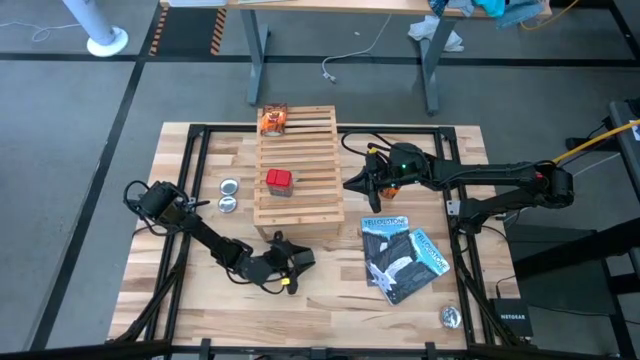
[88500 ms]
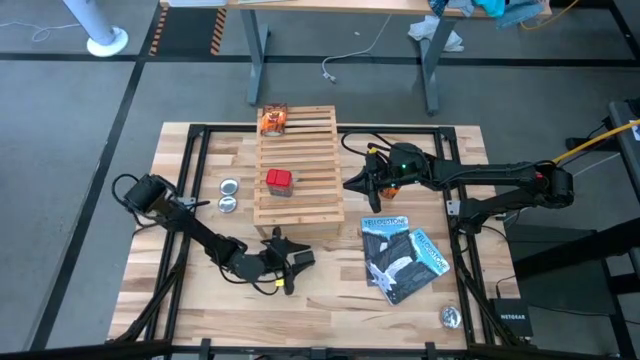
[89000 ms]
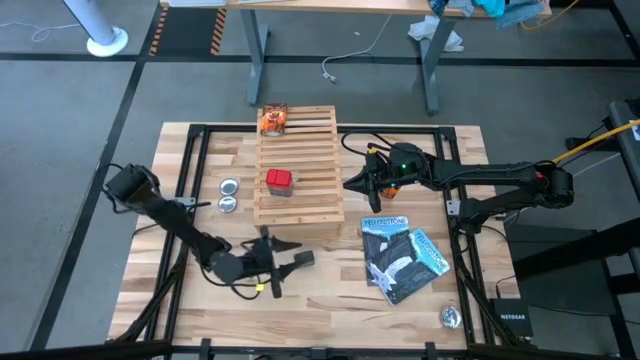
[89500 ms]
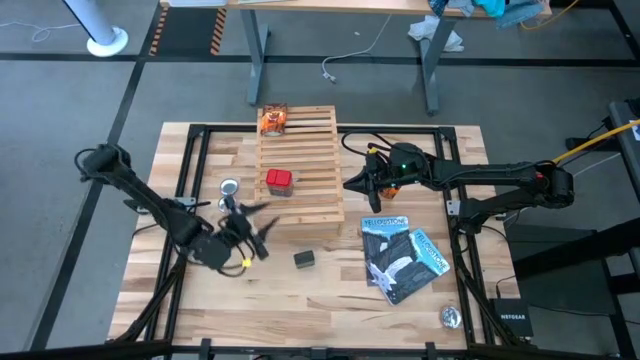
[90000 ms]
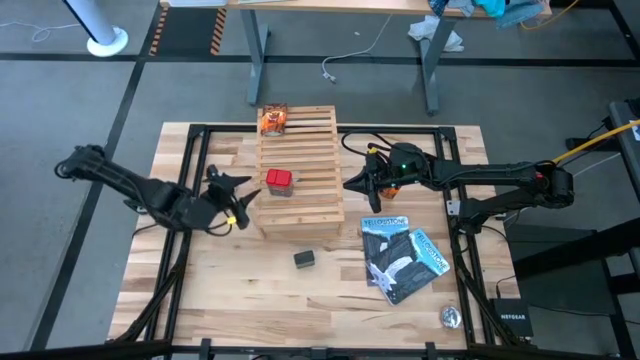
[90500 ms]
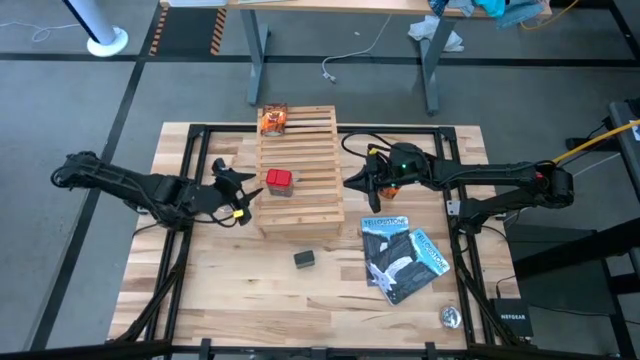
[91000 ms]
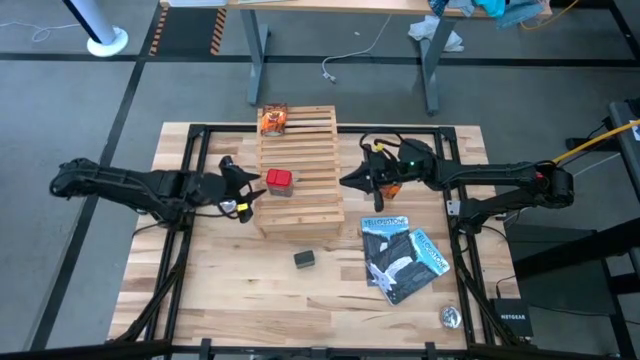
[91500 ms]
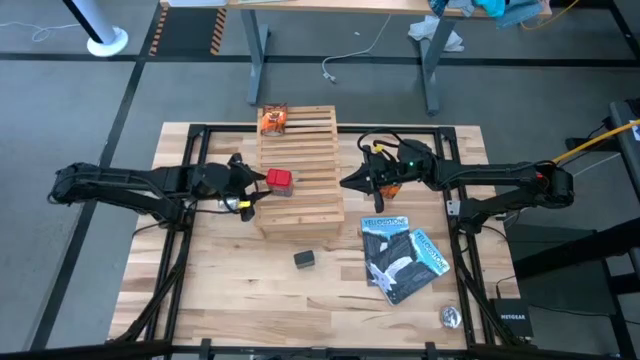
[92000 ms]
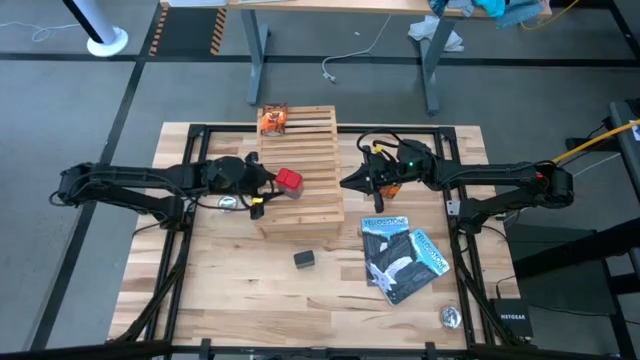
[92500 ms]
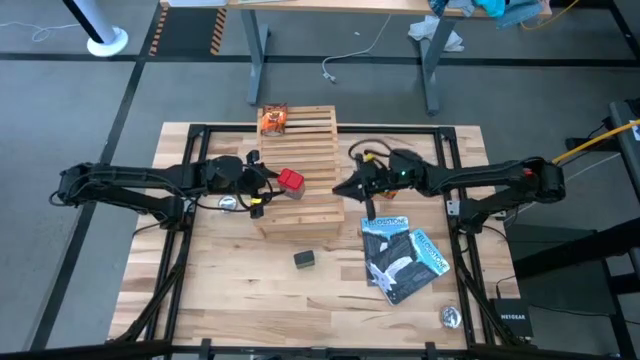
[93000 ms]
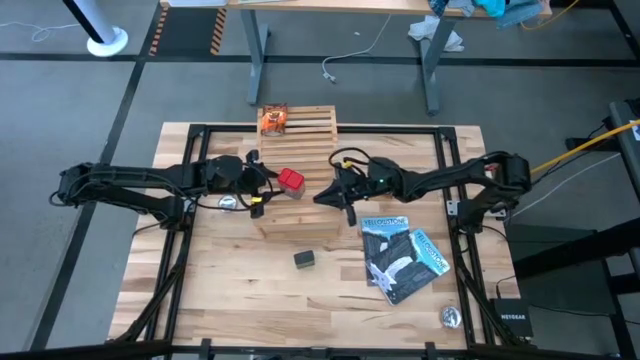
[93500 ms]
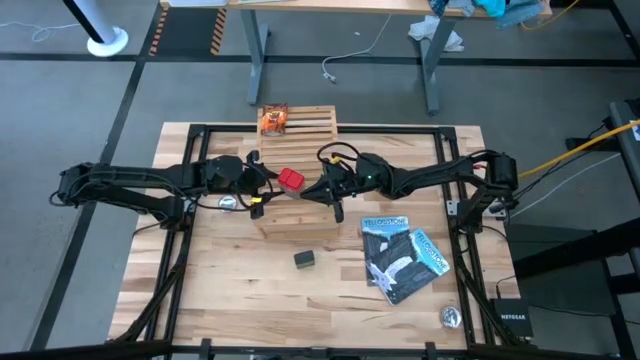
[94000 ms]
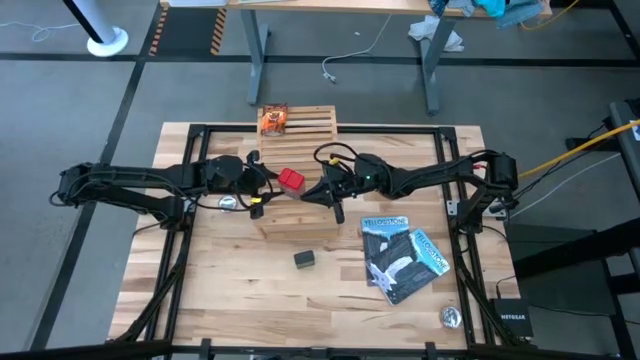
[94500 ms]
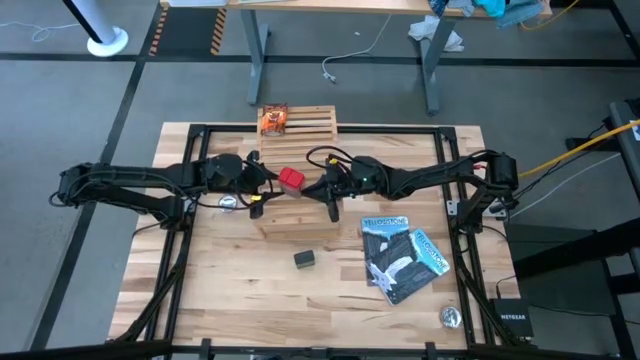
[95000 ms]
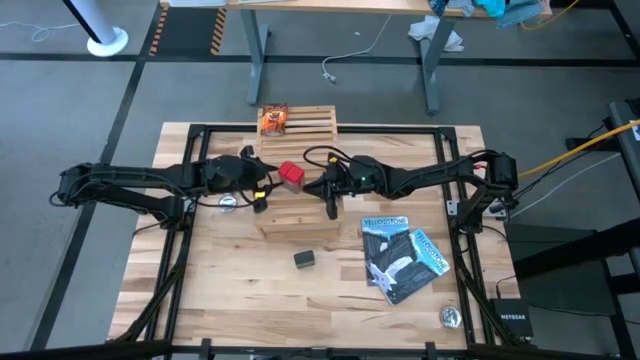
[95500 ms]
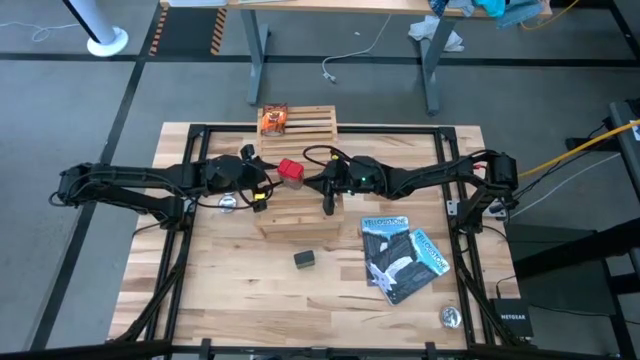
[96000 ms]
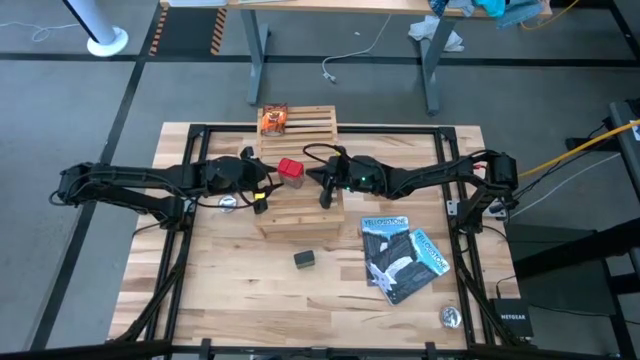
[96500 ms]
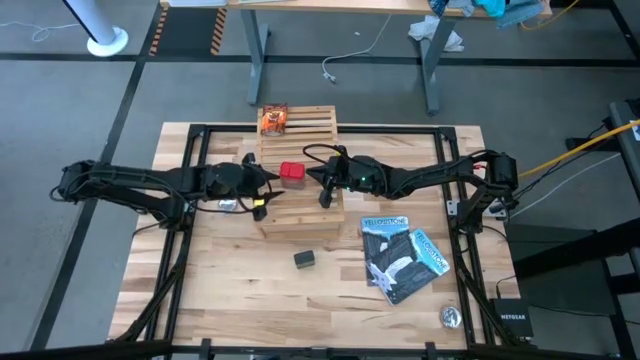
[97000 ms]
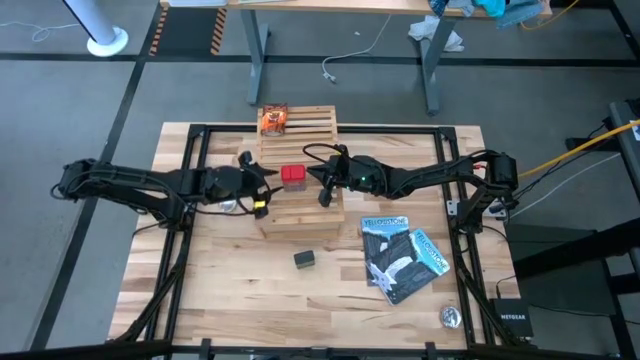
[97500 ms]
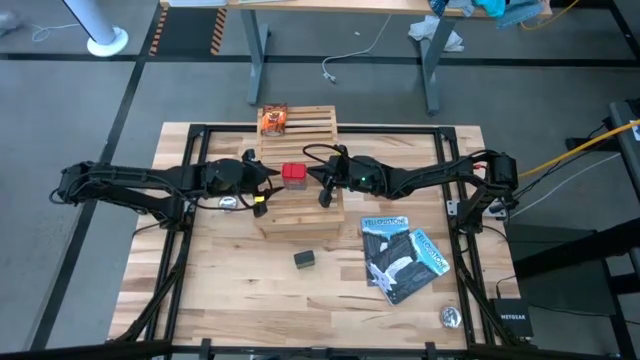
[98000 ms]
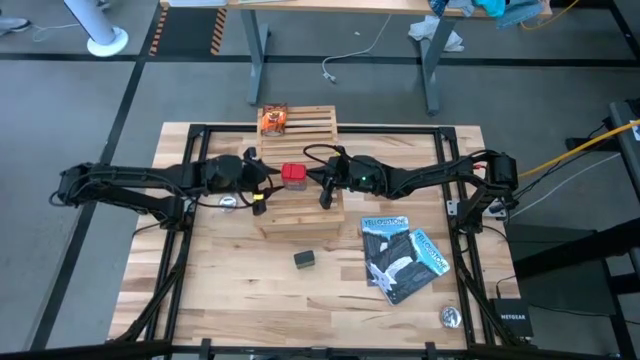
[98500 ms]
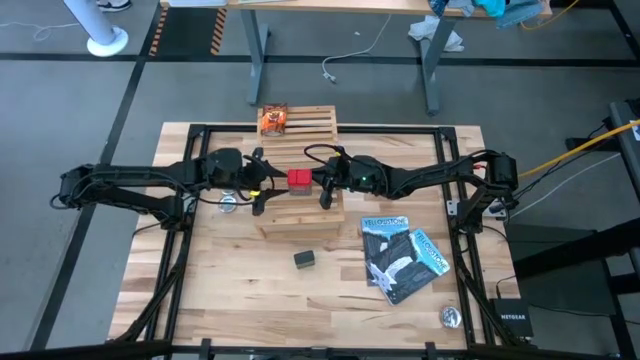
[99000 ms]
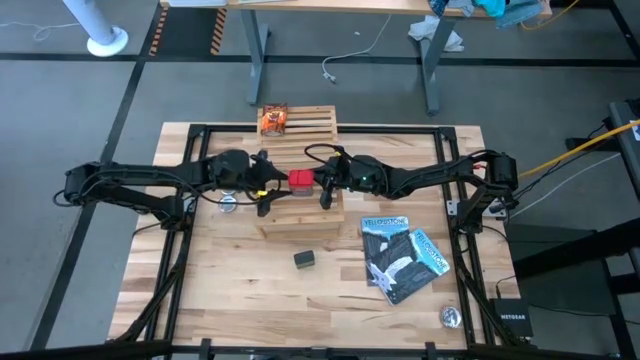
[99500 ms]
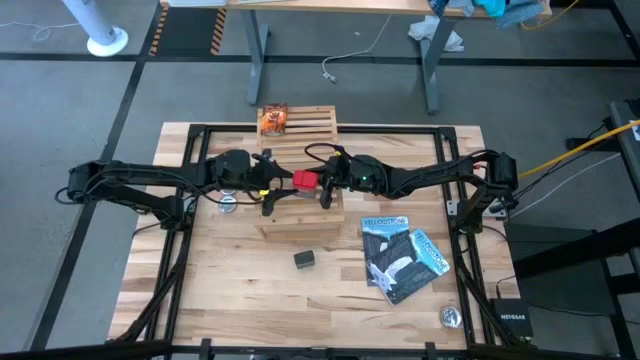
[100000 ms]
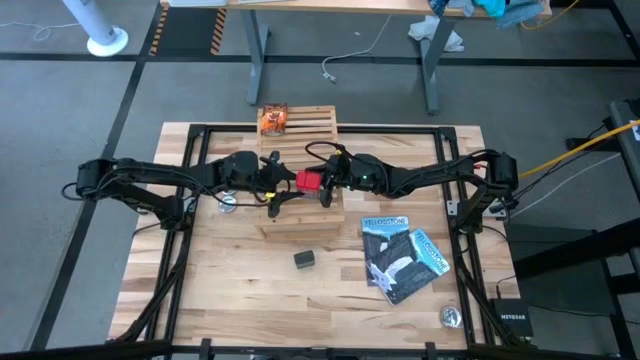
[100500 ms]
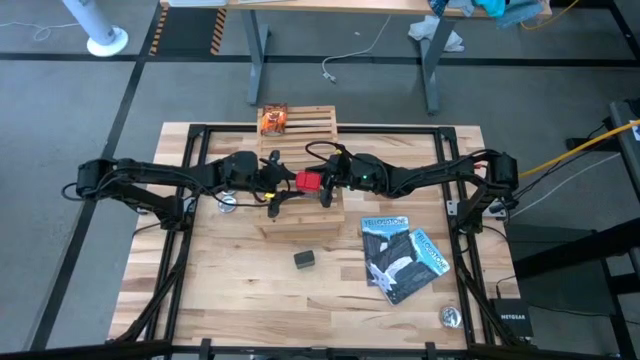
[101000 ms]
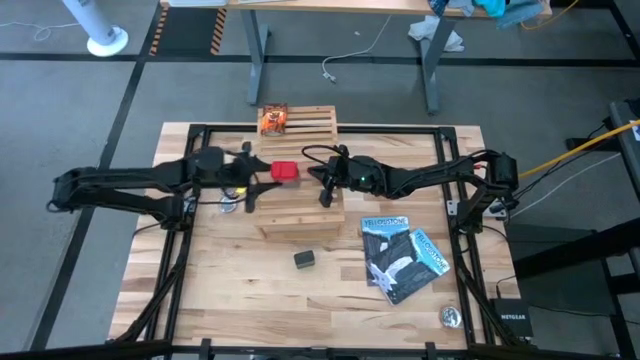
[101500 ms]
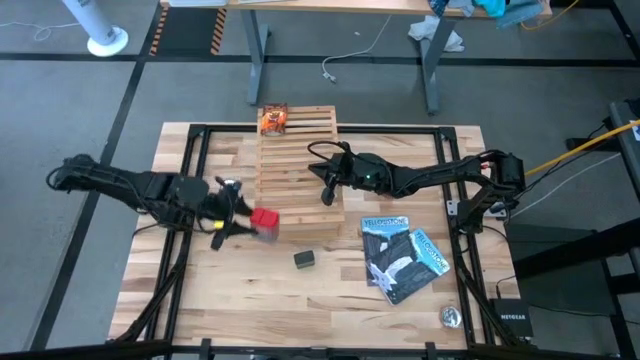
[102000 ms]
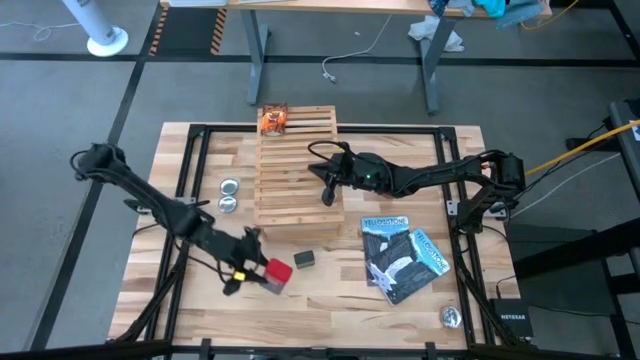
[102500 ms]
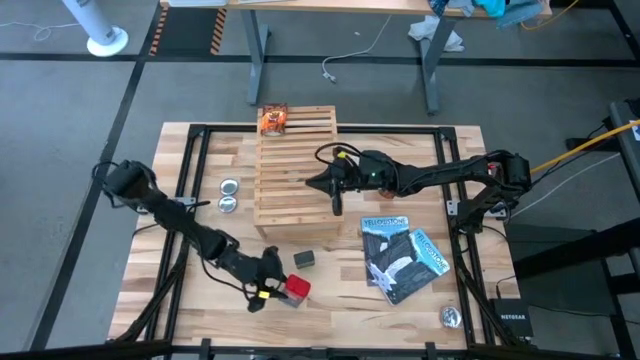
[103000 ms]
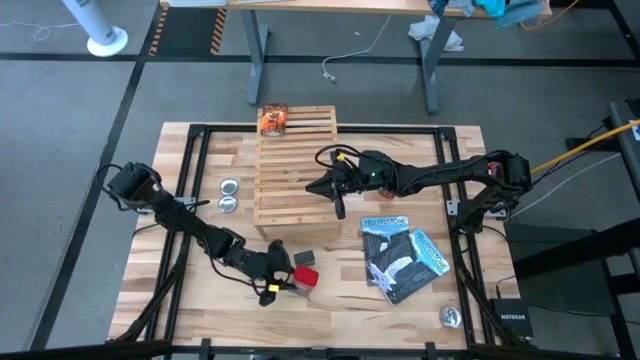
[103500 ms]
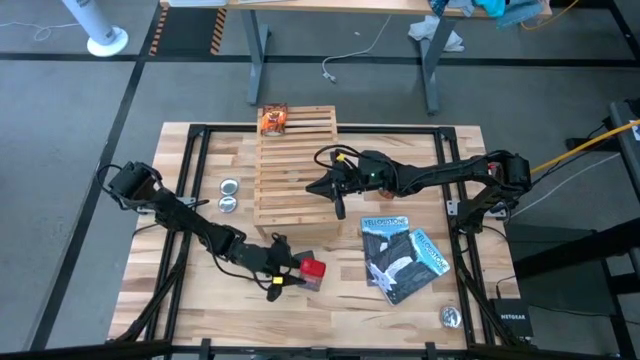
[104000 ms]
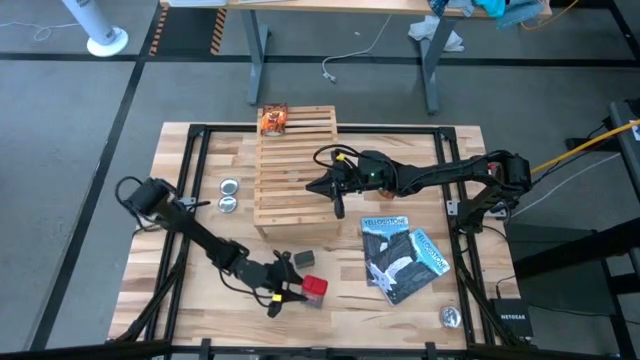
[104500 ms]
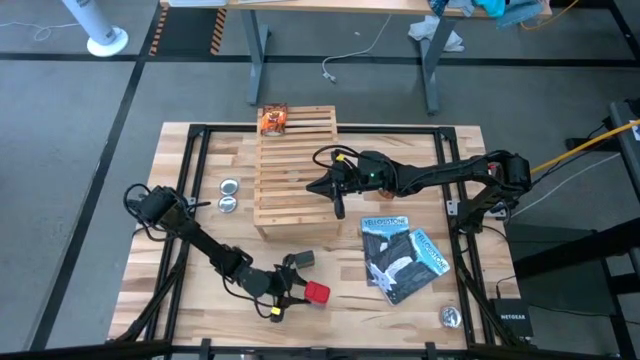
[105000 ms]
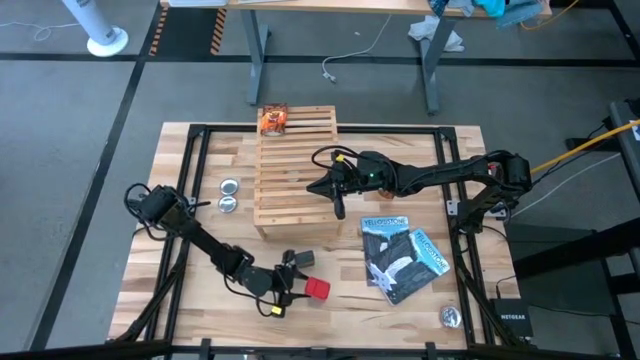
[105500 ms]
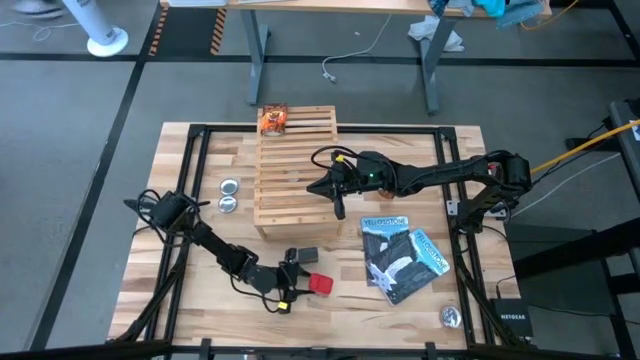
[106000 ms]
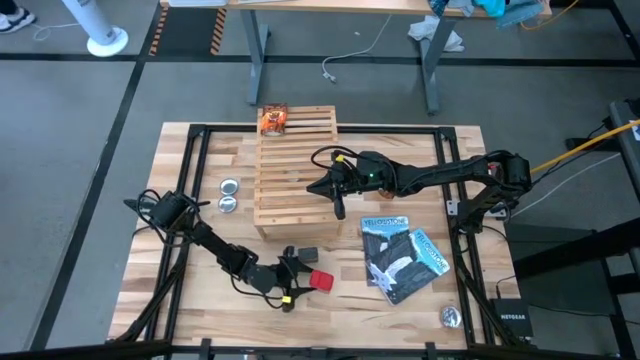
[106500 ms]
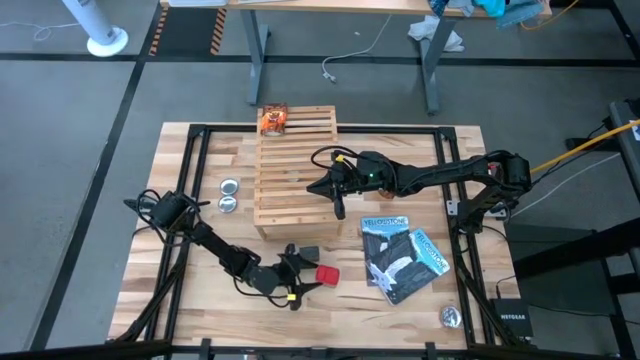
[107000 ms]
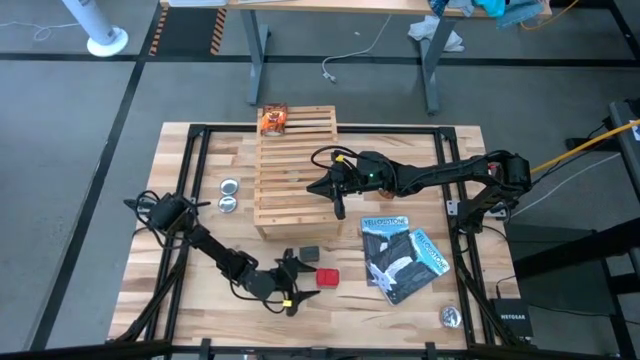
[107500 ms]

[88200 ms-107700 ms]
Task: Shelf spices
Remove the red seasoning can from the shelf

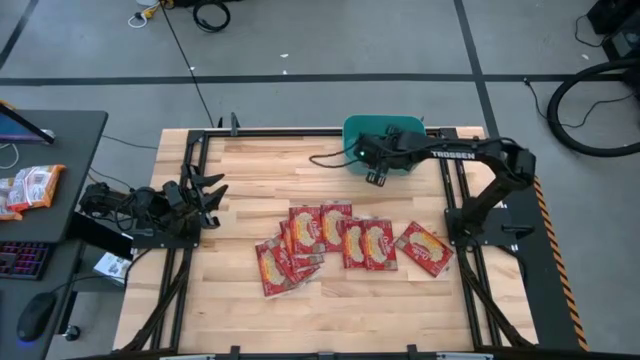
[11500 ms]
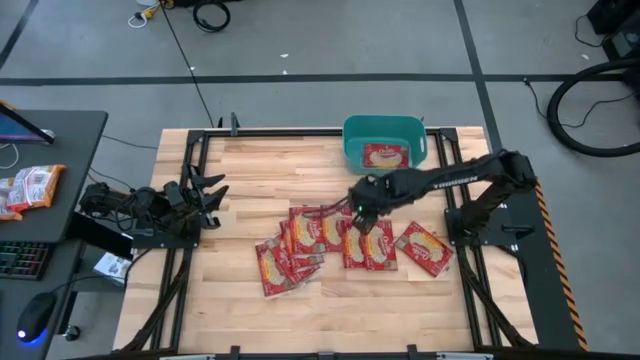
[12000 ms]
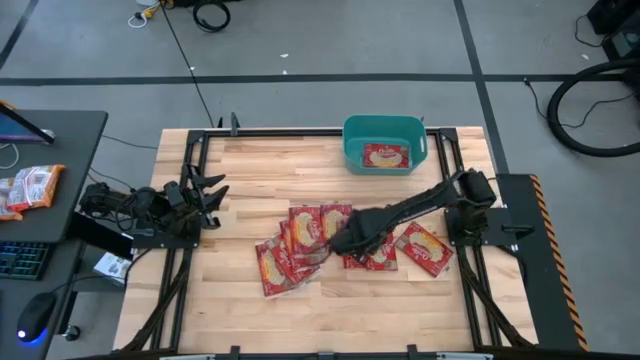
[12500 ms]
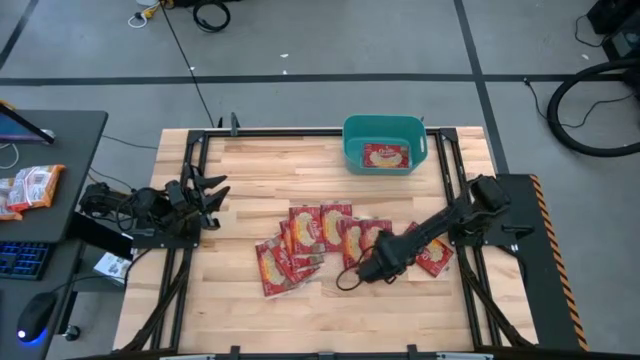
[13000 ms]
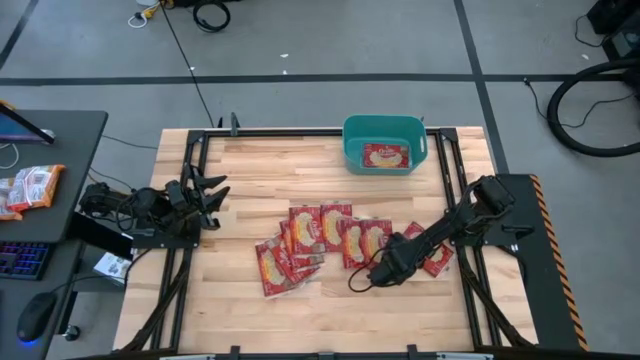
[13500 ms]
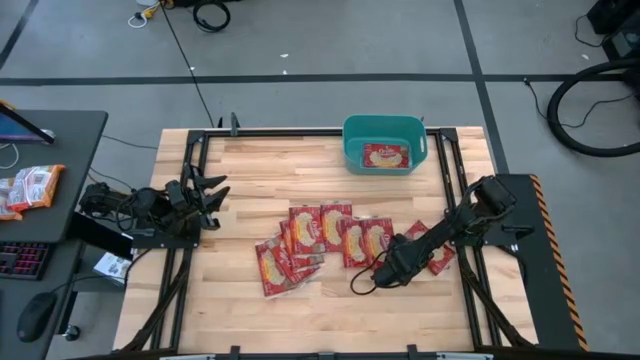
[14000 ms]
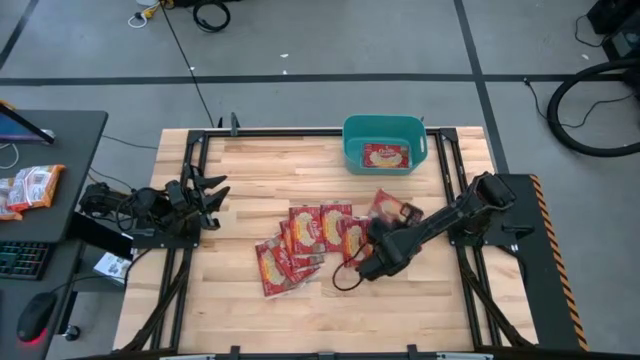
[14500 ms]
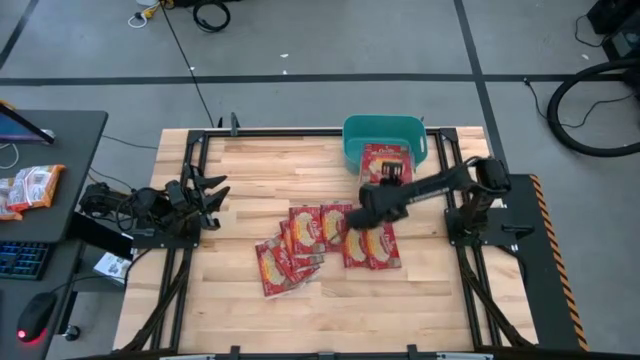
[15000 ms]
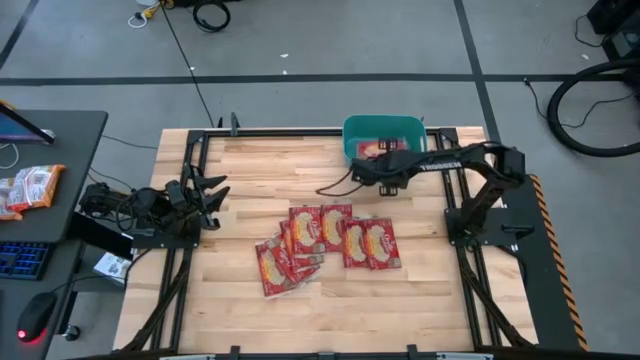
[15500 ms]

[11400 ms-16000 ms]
Task: Sort popcorn bags into baskets
Put the popcorn bag into the green bin
